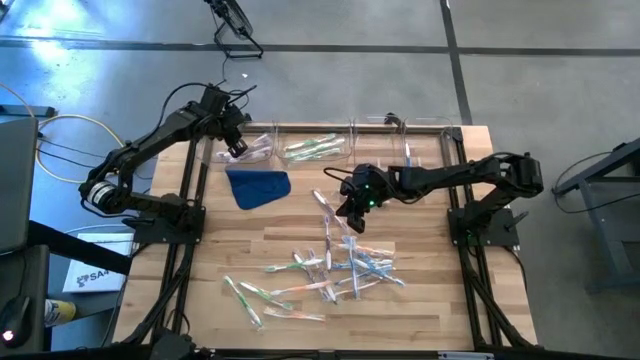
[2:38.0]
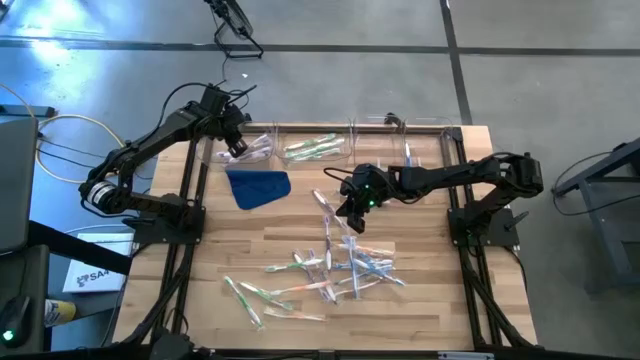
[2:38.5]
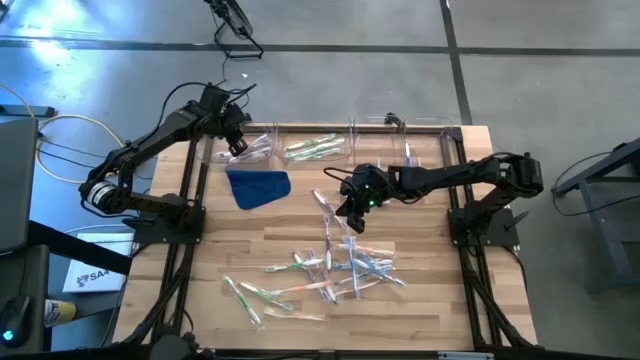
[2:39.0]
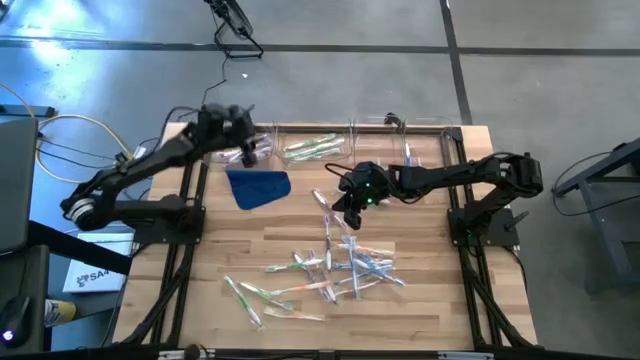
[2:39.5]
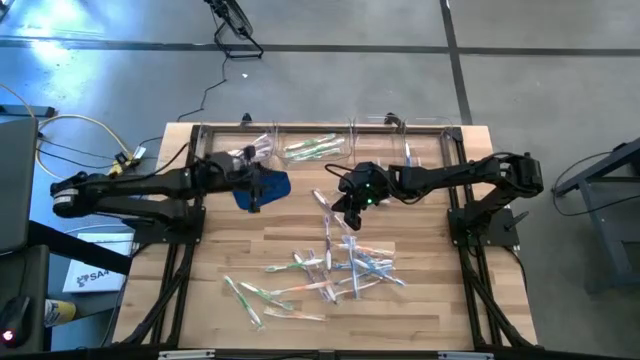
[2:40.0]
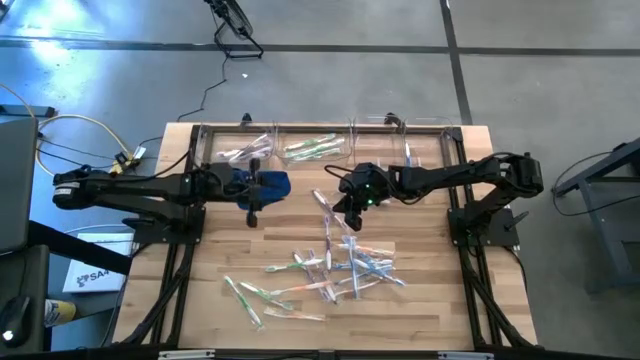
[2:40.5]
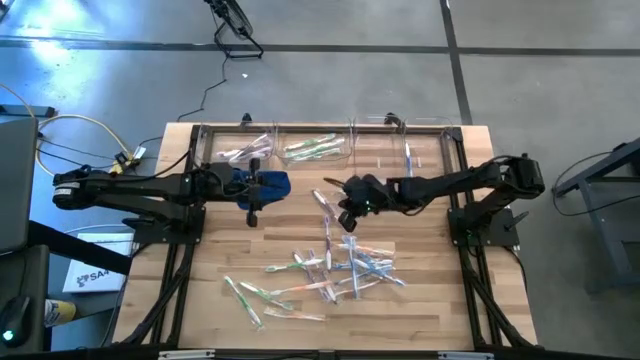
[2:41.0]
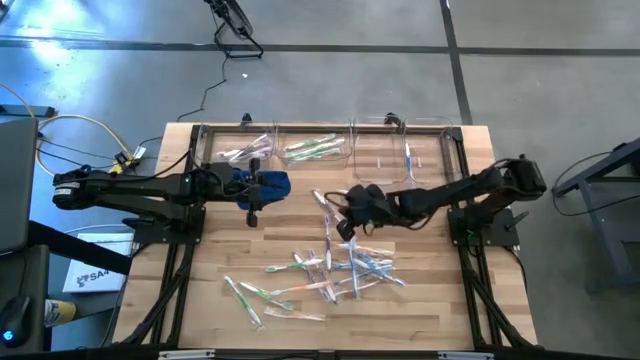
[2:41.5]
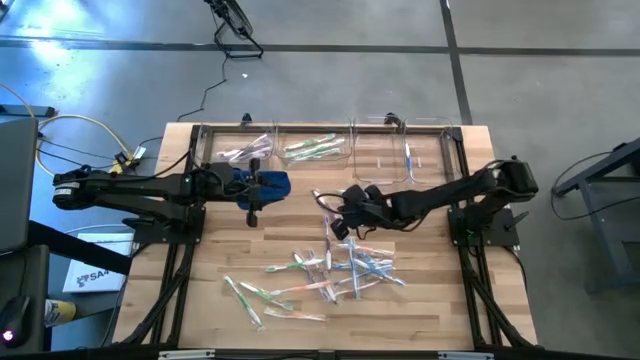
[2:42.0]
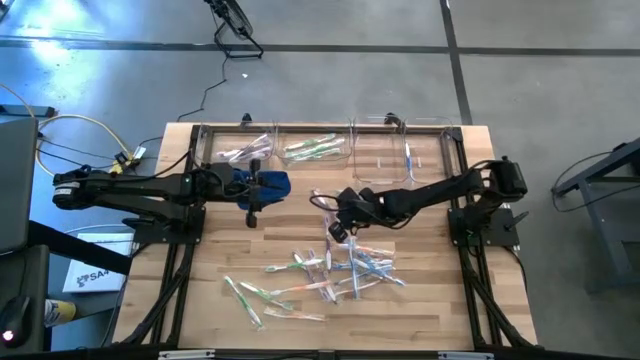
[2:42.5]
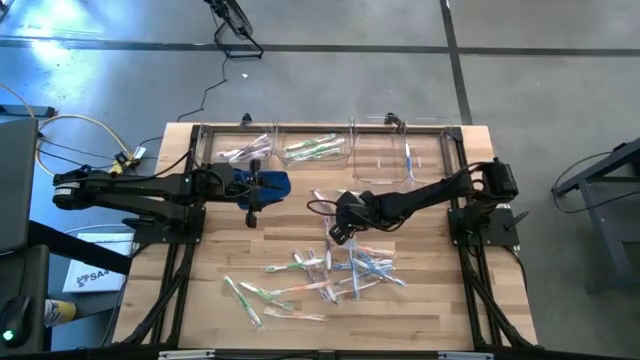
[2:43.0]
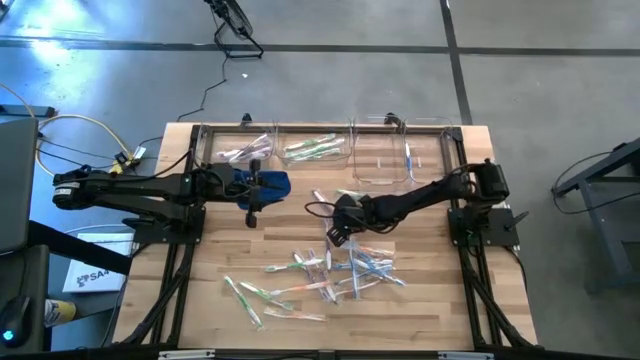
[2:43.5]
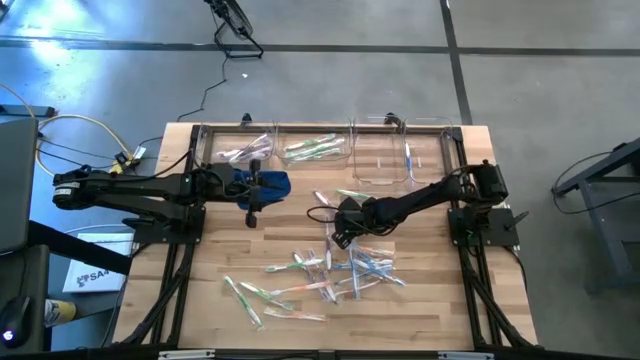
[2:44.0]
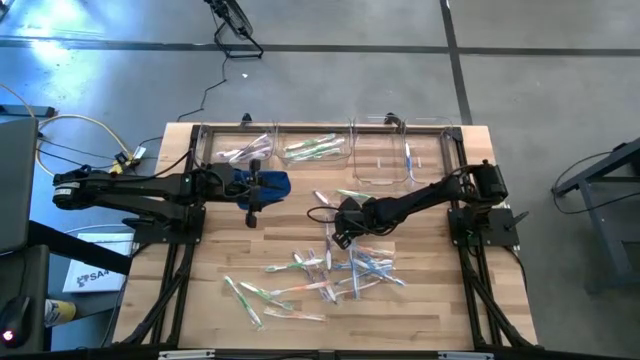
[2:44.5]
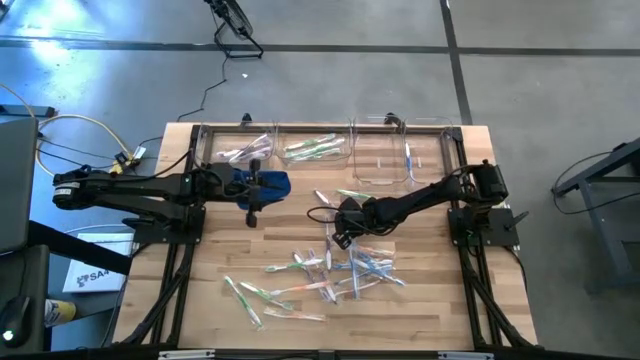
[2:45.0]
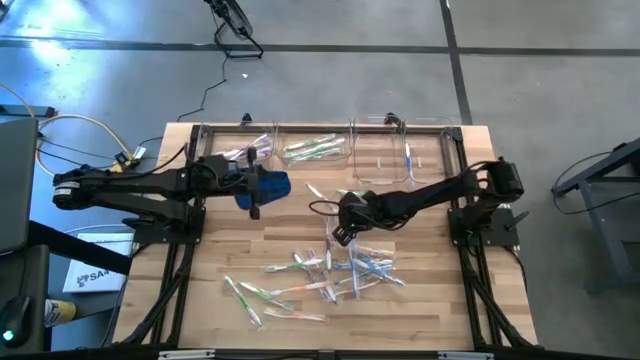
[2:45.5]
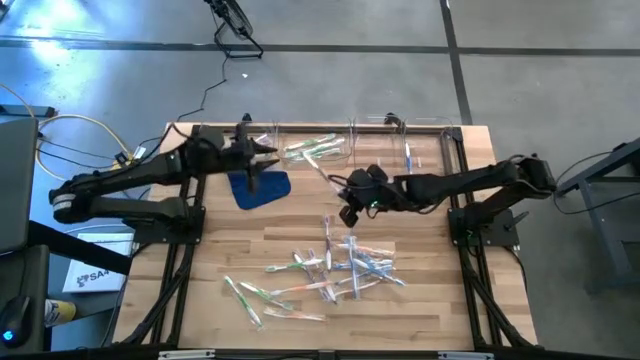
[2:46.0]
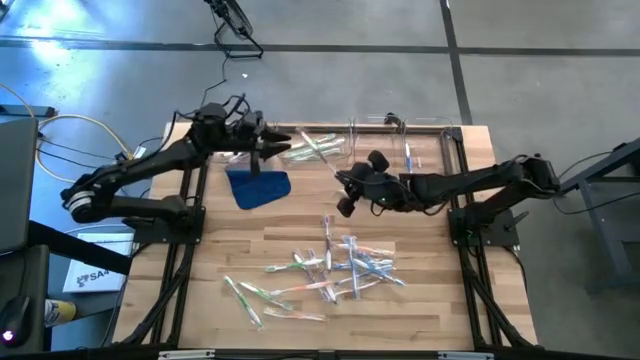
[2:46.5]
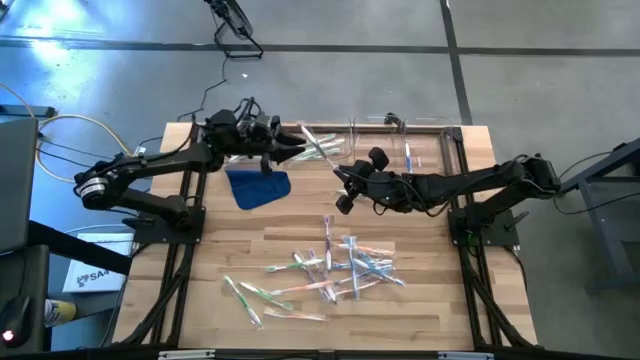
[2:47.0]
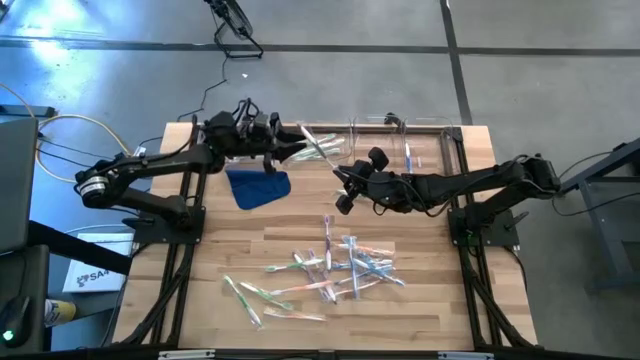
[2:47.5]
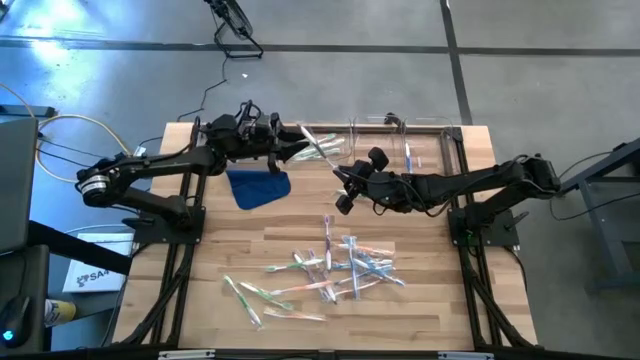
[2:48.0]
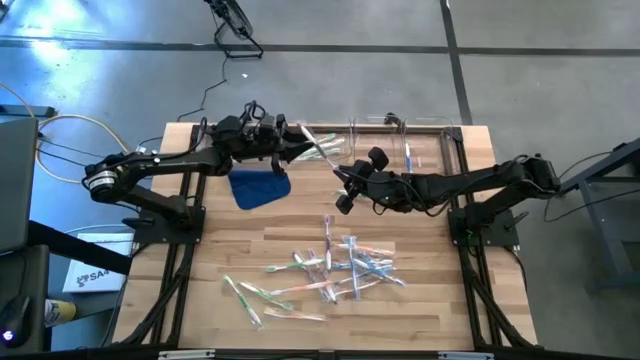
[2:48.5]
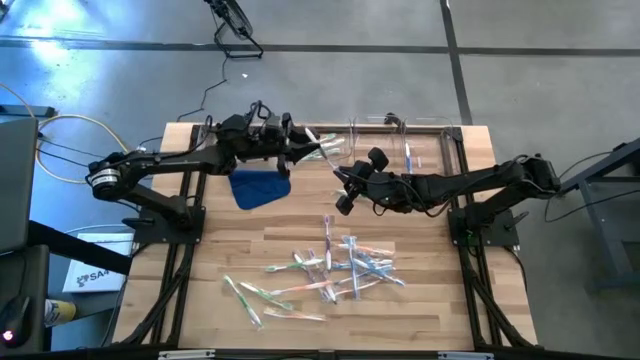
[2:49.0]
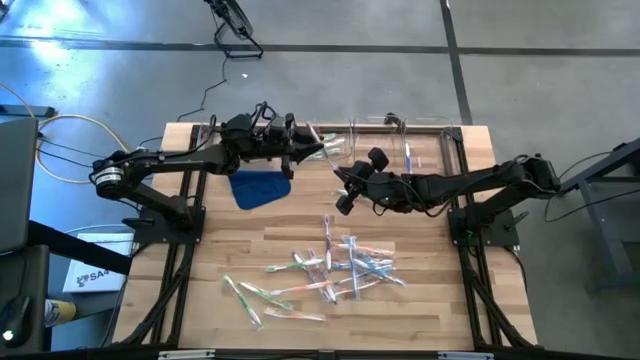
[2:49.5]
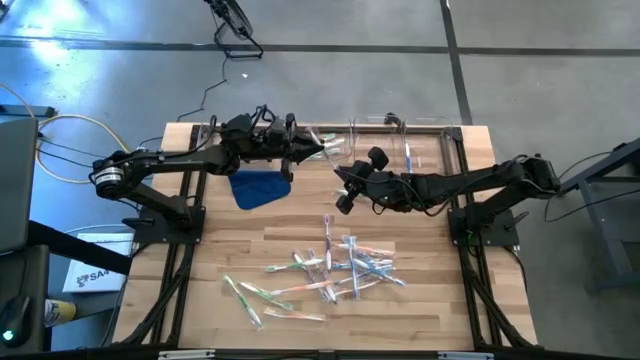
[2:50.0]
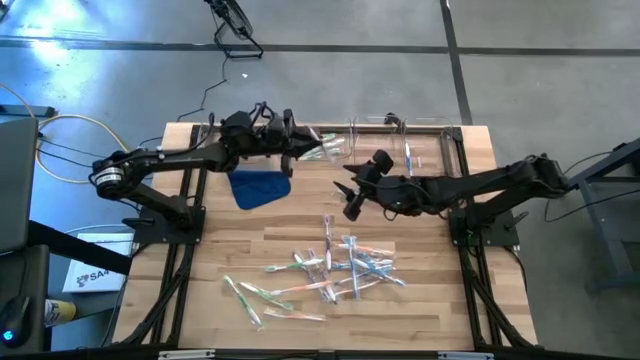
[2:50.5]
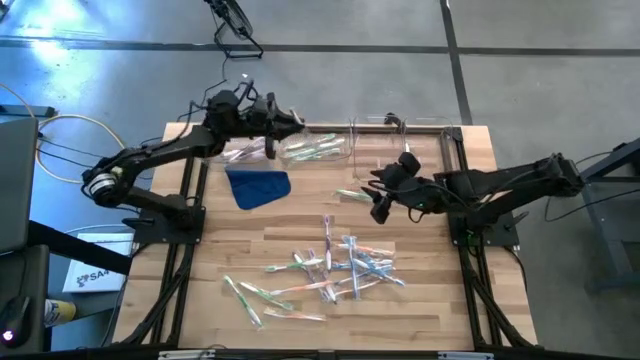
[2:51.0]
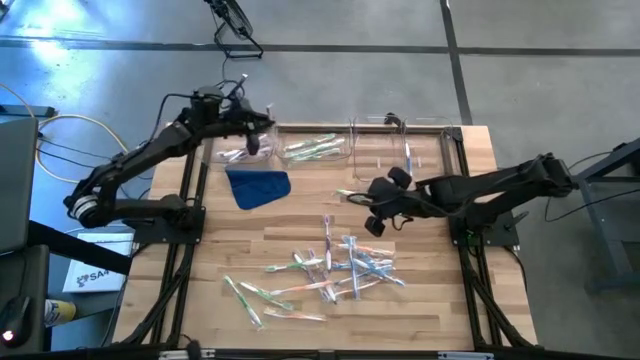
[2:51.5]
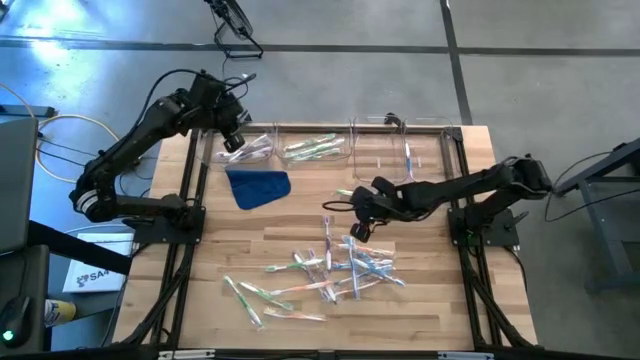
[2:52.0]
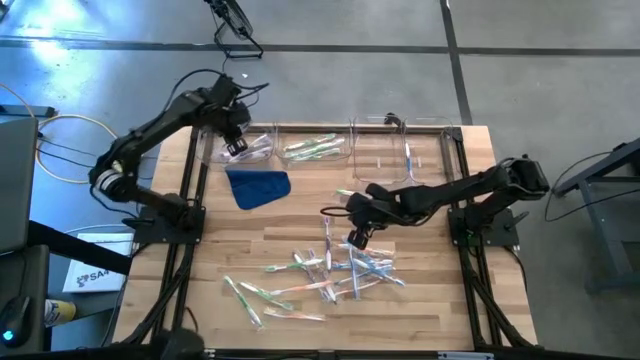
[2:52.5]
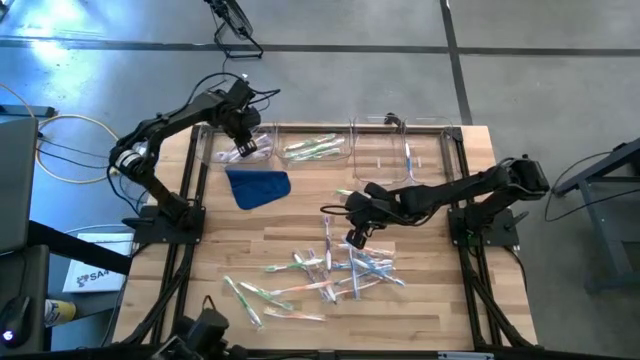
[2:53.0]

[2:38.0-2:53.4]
Task: Pick & Place Toothbrushes
Put the violet toothbrush into the left transparent bin

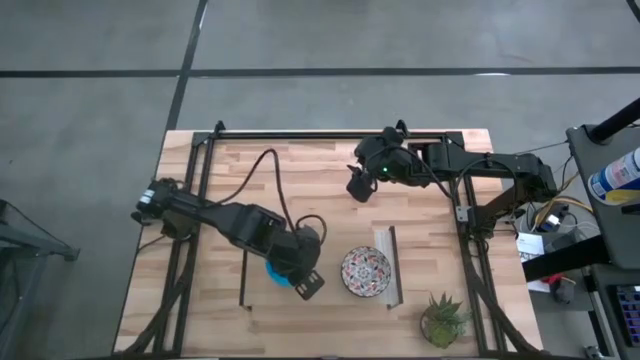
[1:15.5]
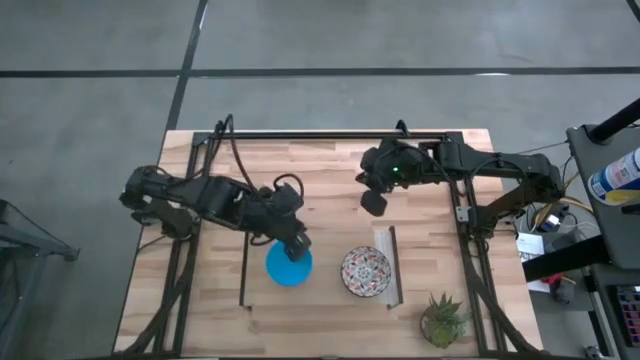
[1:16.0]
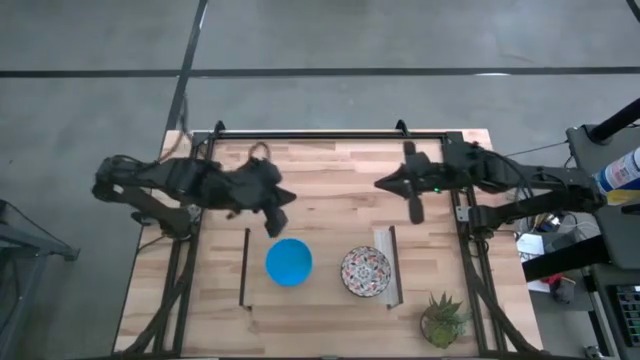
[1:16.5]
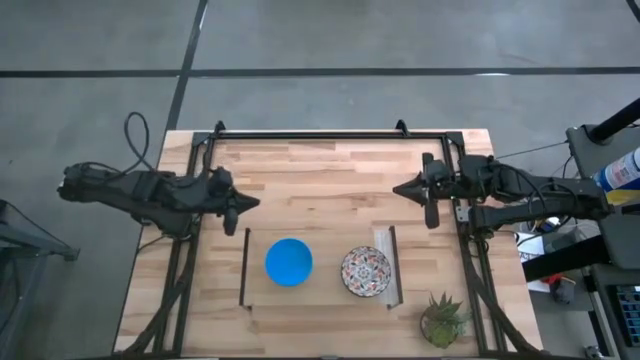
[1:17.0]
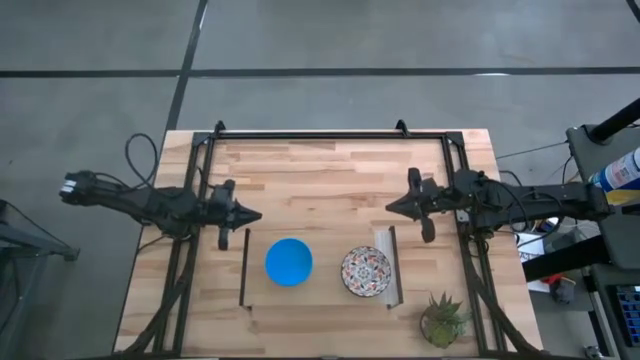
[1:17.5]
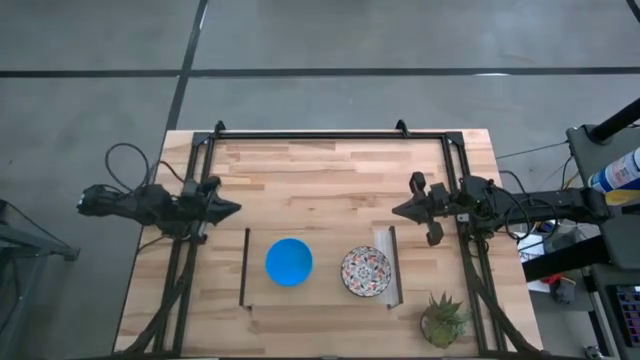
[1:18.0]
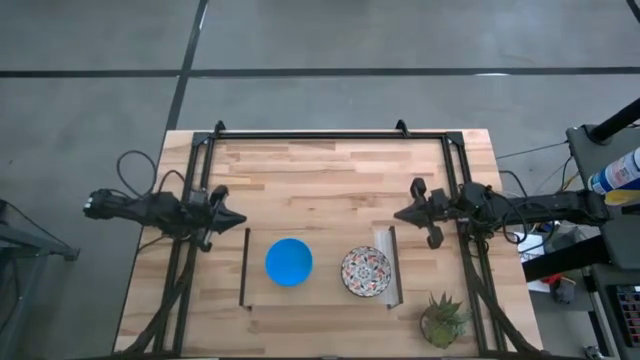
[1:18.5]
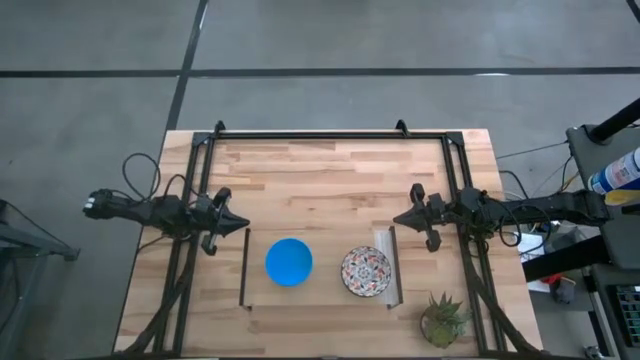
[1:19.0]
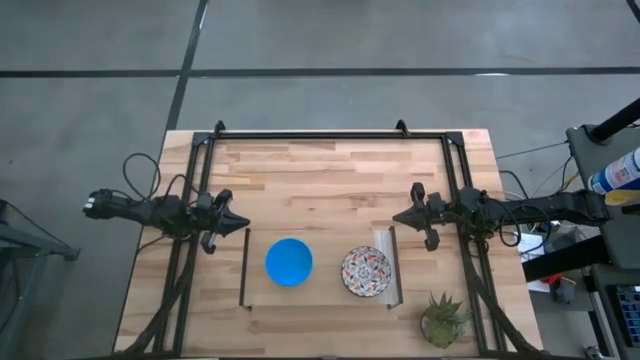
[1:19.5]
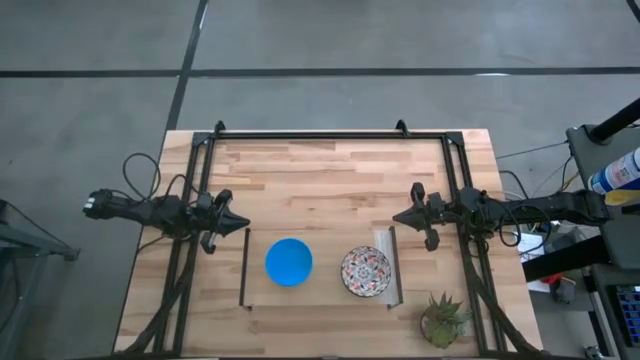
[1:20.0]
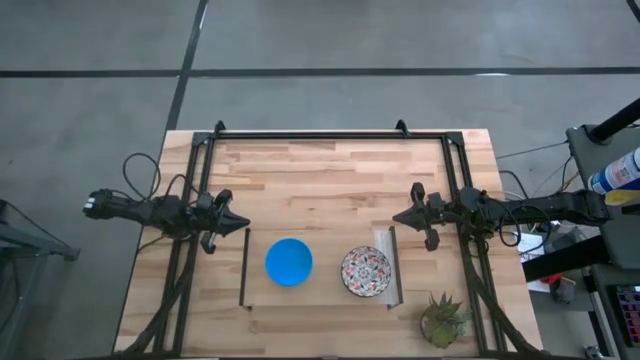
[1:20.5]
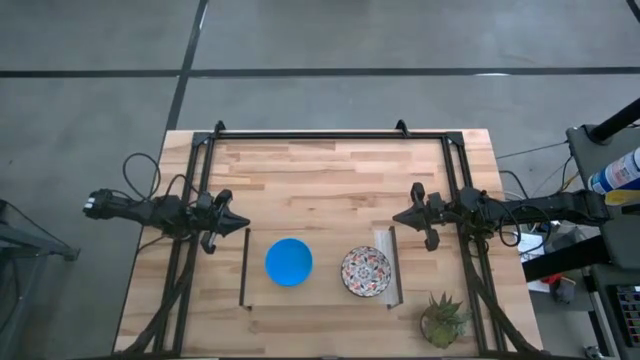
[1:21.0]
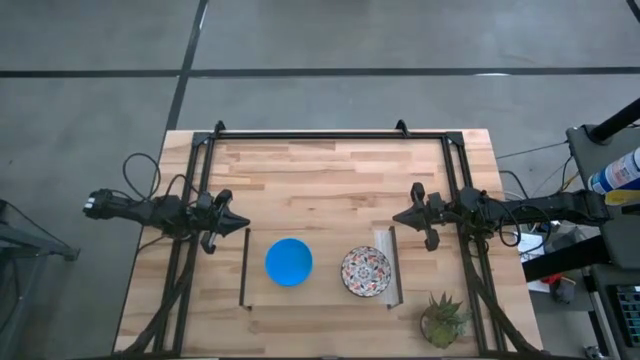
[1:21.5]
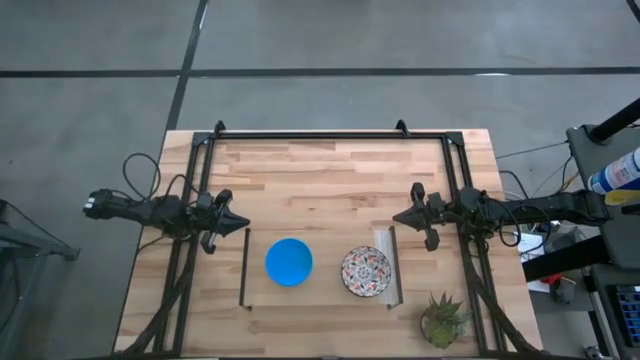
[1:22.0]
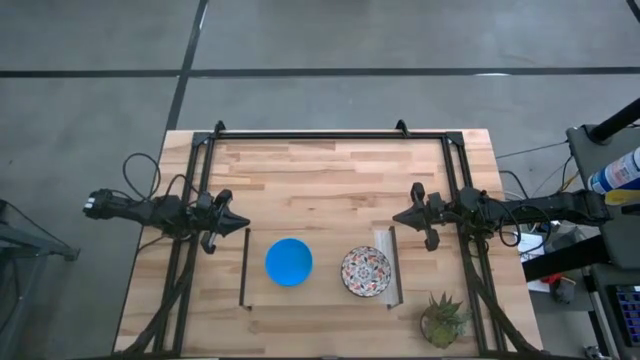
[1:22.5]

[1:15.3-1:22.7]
Task: Pick & Place Mini bowls
Return to Home Position
